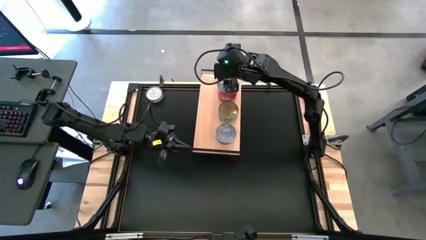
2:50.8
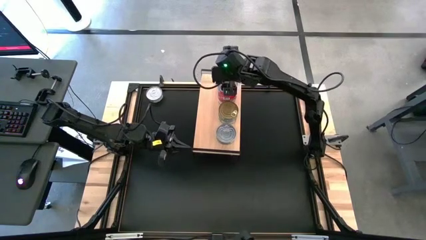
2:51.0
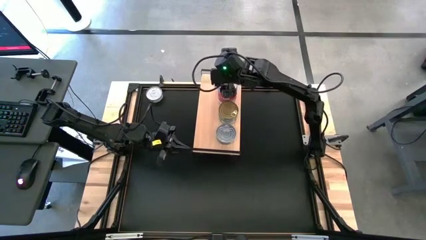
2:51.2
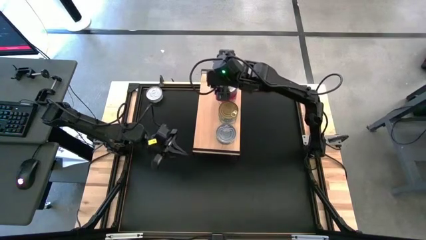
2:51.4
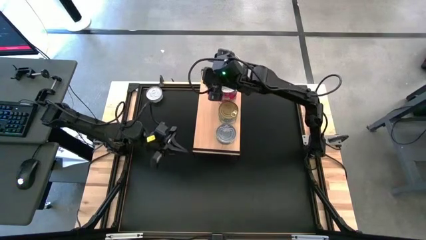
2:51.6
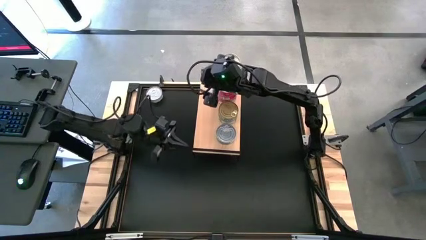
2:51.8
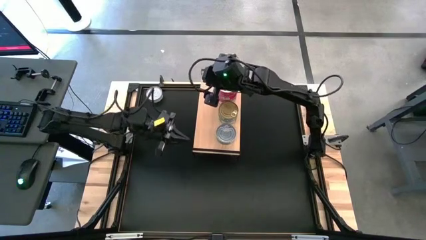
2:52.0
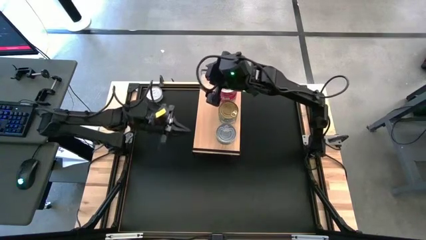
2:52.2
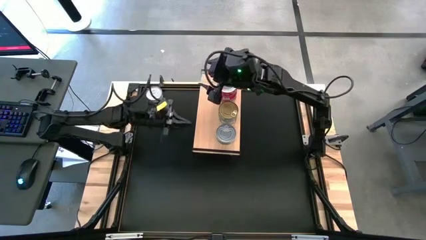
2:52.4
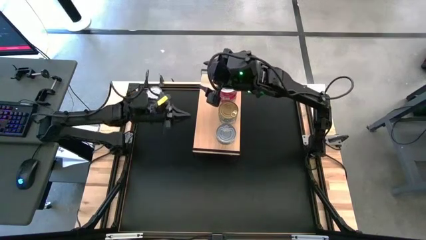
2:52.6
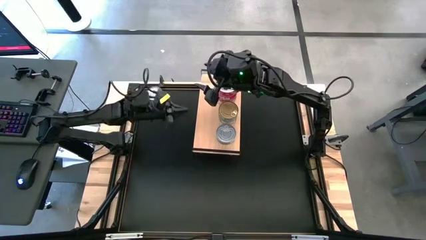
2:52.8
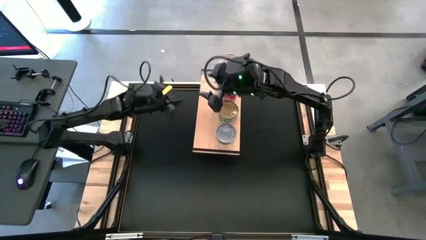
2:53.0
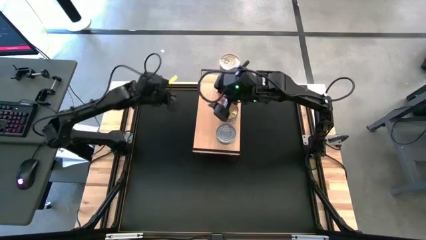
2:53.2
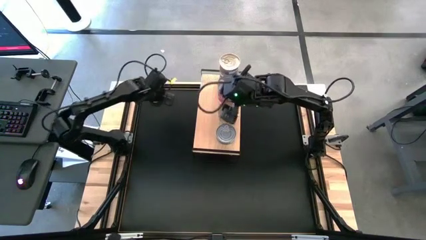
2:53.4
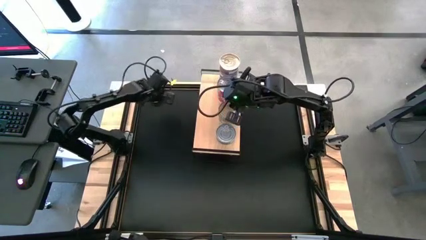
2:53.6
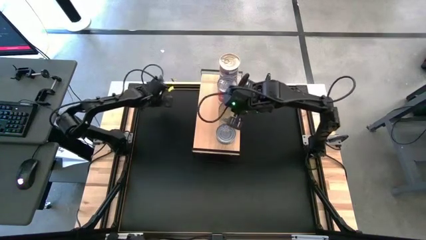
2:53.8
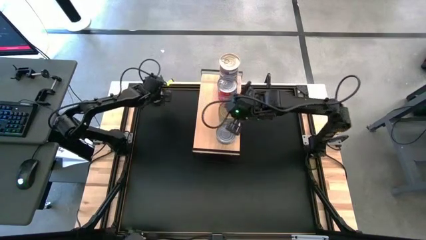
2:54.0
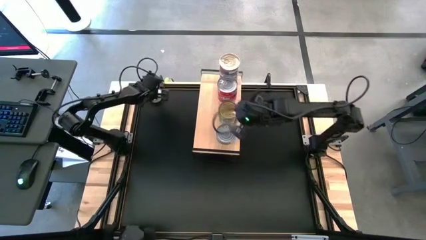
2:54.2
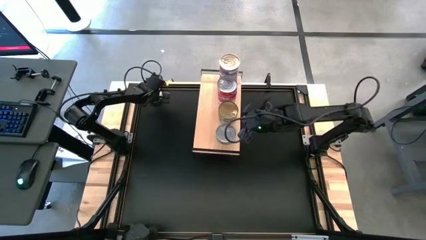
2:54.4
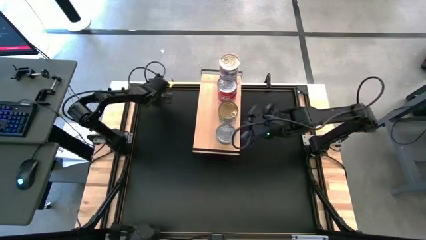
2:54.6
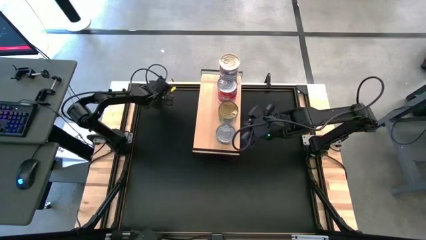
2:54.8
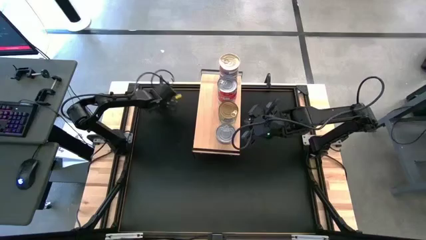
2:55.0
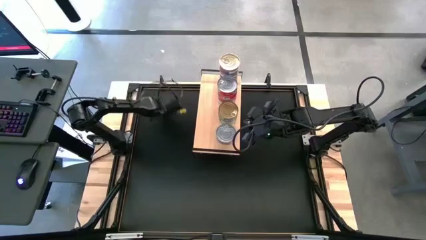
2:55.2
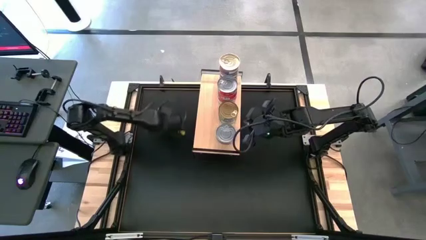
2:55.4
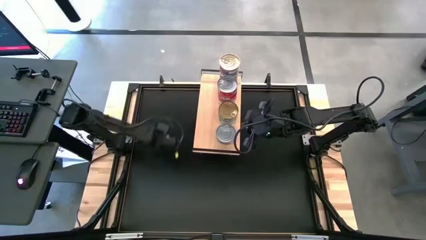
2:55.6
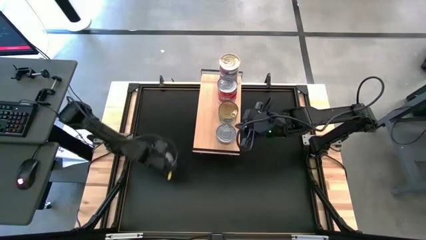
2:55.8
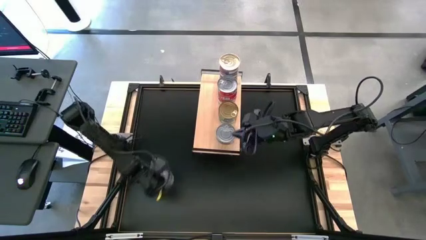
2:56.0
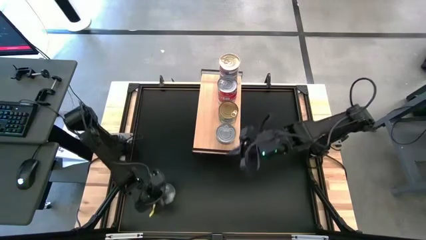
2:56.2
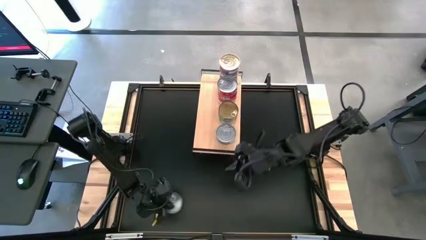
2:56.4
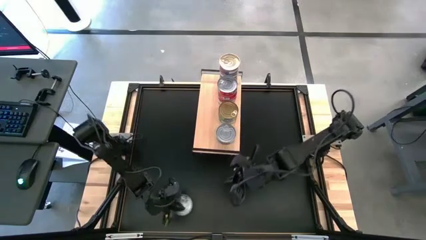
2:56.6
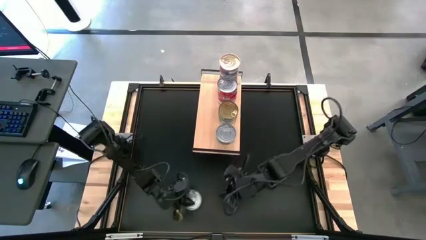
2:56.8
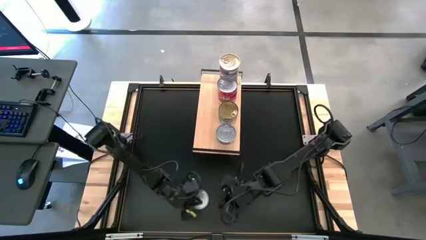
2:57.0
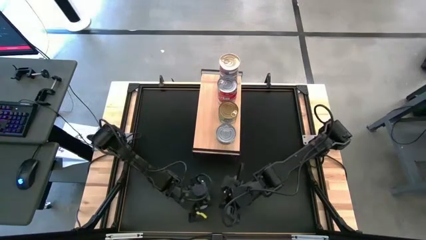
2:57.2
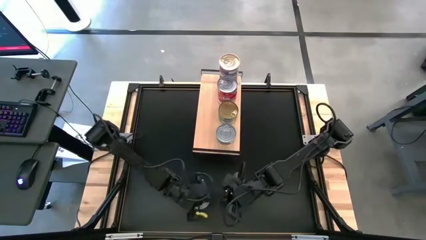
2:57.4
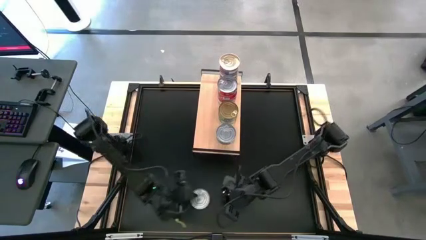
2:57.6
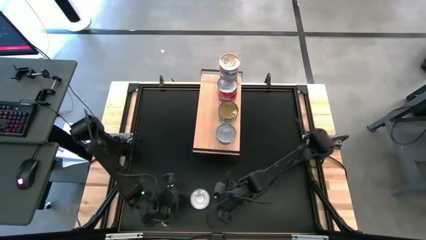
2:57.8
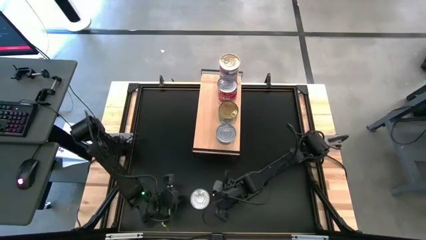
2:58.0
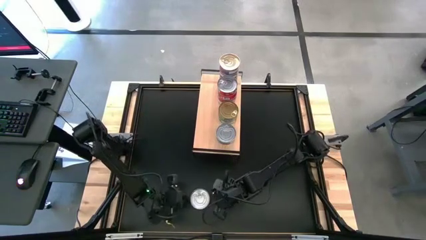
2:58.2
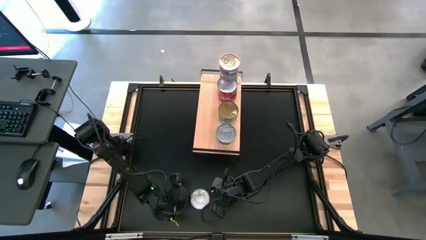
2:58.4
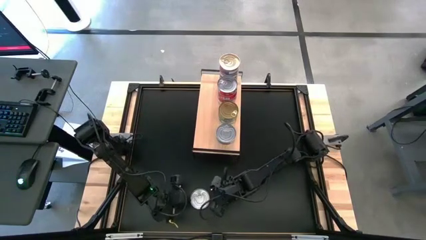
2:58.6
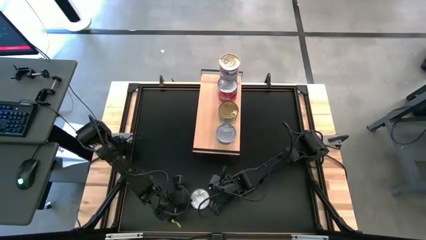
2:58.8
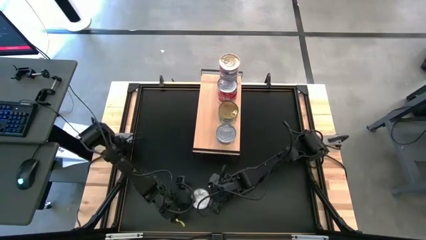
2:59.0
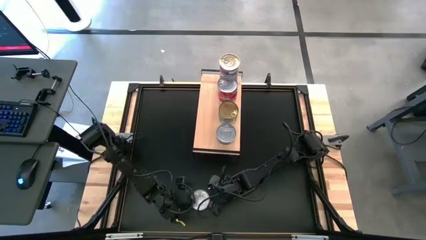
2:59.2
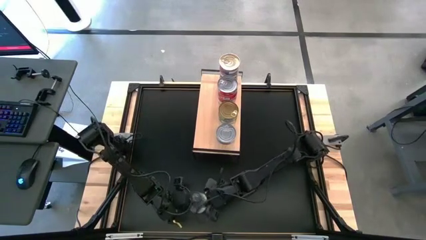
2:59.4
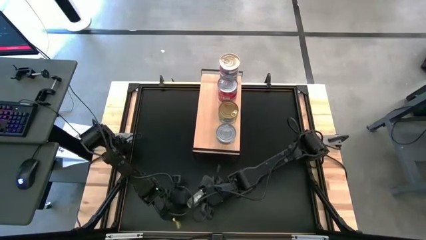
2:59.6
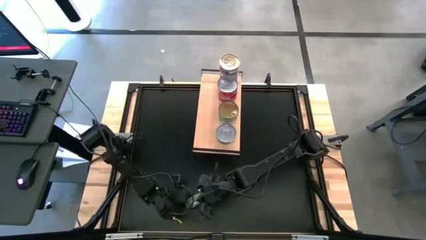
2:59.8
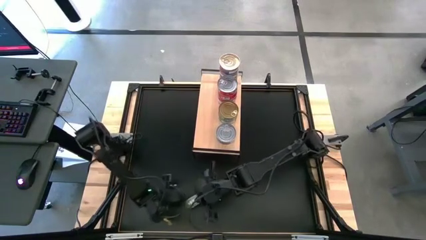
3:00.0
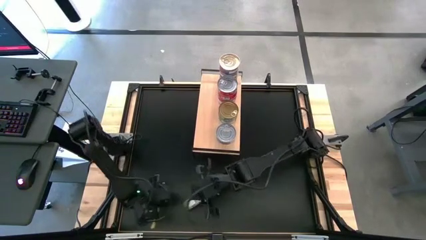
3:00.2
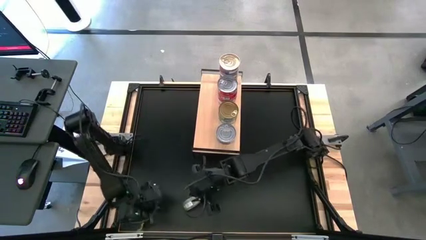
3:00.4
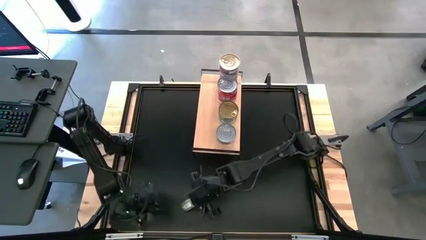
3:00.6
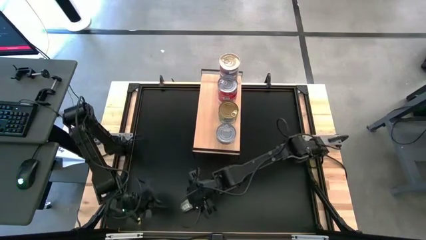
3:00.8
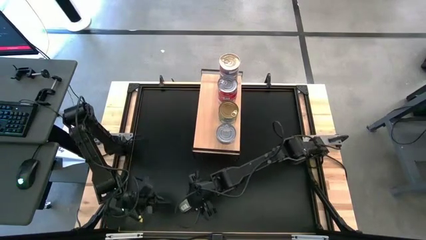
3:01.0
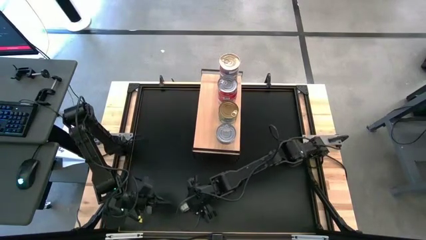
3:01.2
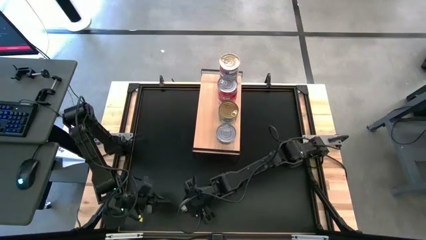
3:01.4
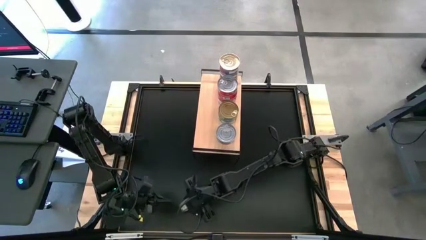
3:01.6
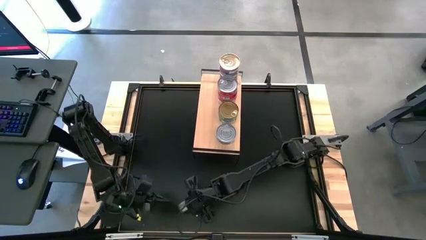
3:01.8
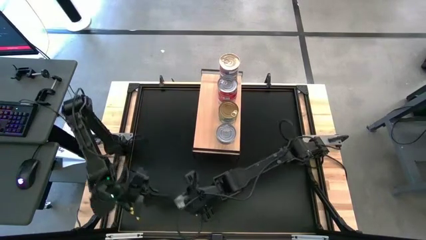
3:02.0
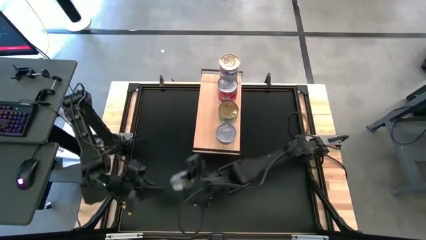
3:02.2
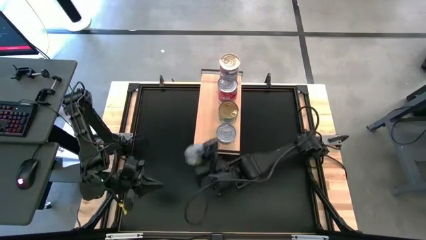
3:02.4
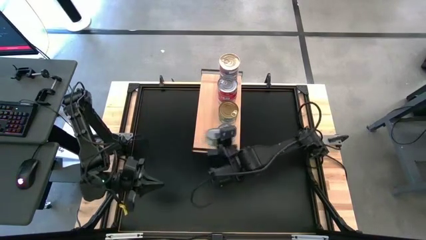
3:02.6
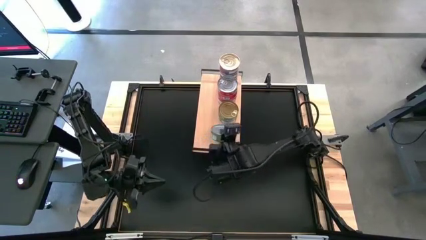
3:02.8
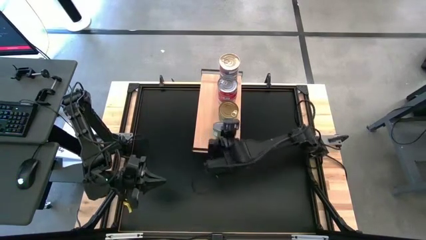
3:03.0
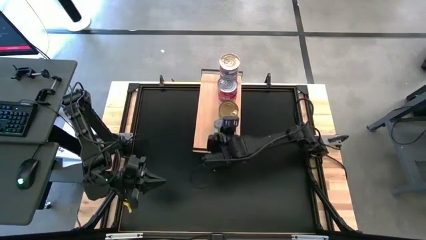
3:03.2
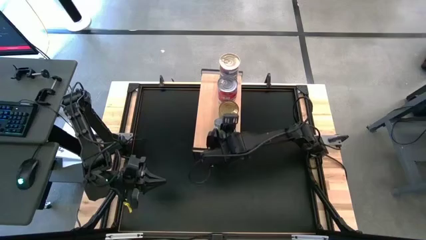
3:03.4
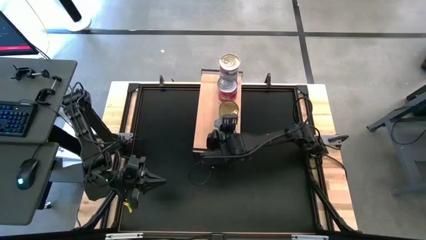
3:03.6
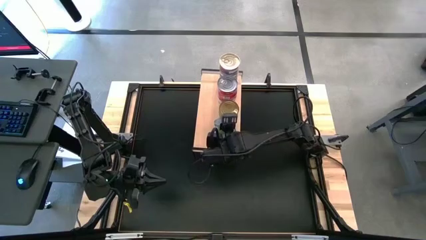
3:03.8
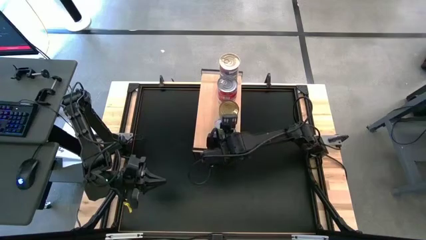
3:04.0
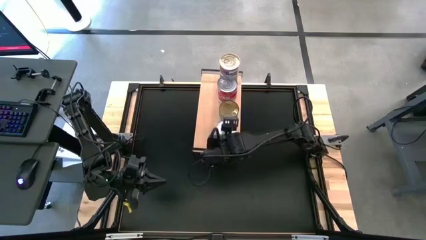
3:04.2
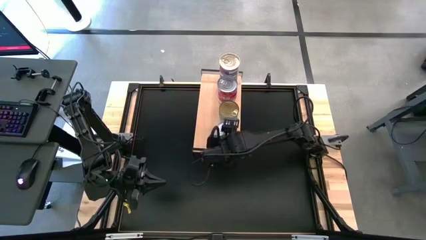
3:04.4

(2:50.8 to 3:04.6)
Task: Stack canned seafood by type on shelf
Stack the dark green tuna can on top of the dark green tuna can on the shelf

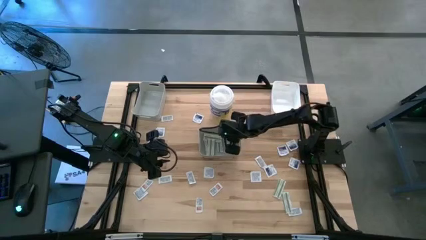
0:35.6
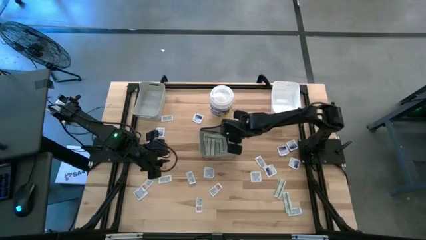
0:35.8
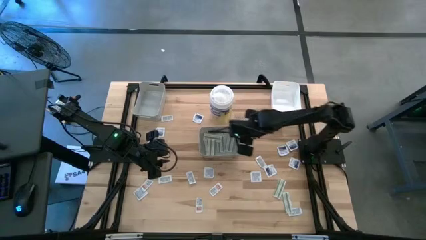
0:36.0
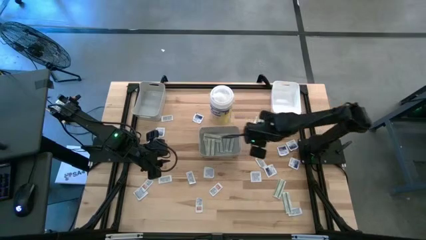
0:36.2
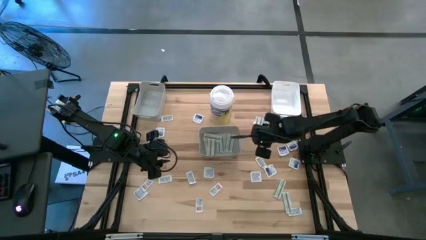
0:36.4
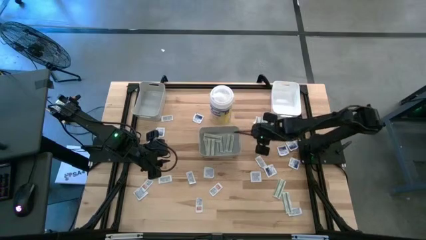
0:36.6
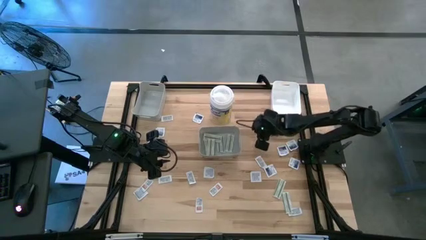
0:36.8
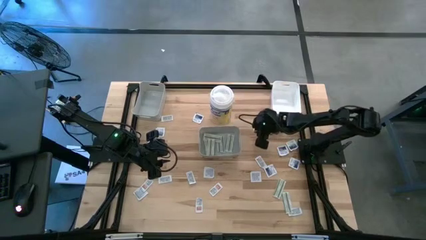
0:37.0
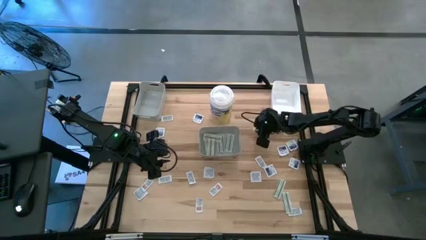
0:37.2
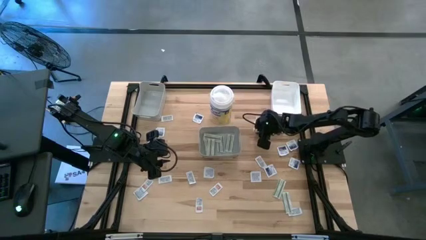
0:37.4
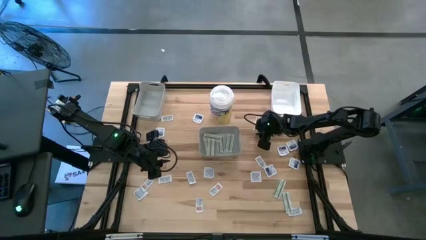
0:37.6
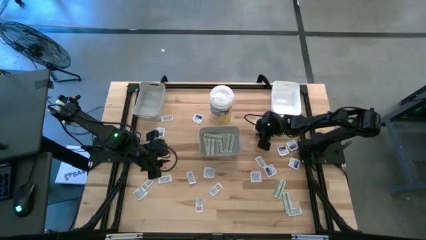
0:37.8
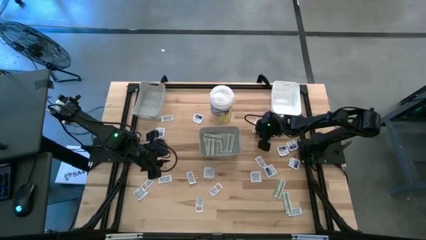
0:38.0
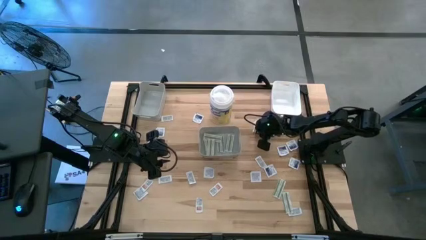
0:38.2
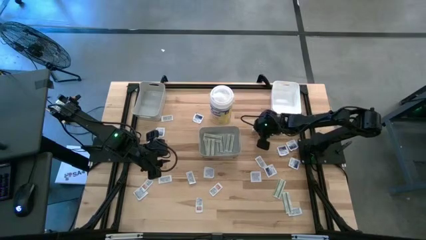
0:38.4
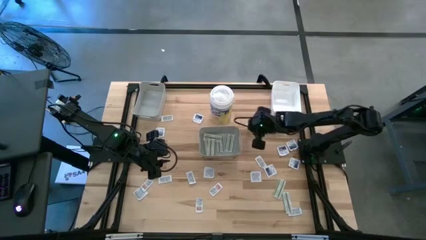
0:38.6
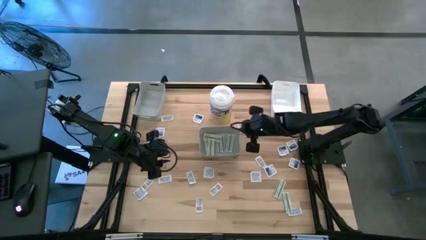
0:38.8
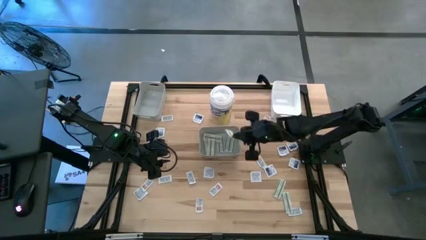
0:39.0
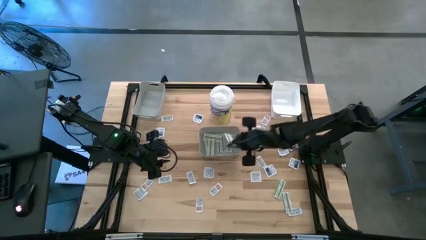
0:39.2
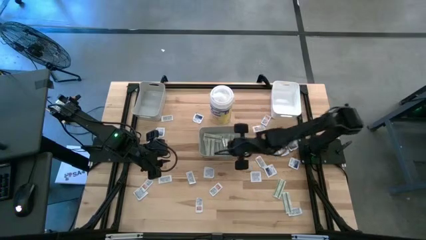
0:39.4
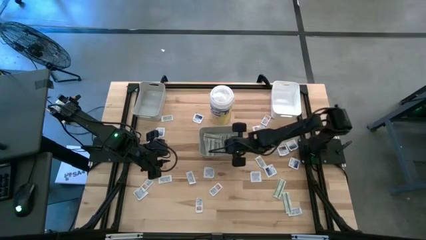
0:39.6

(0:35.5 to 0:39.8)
Task: Pick & Place First Aid Supplies
Put the bandage into the bottom gray bin
